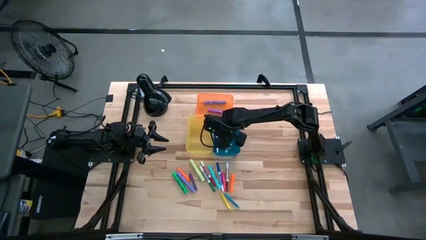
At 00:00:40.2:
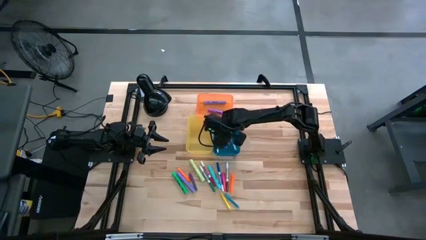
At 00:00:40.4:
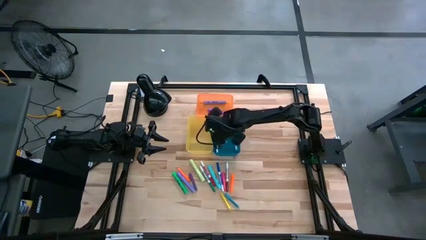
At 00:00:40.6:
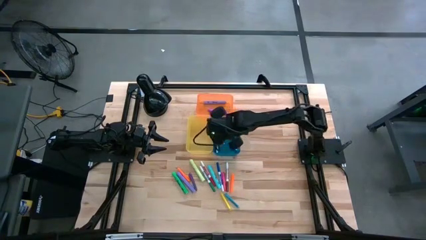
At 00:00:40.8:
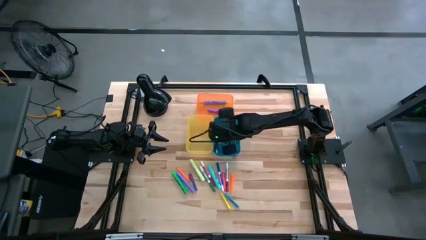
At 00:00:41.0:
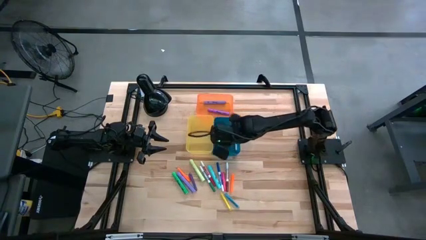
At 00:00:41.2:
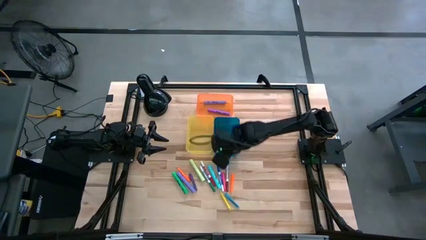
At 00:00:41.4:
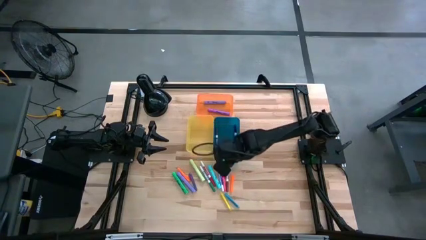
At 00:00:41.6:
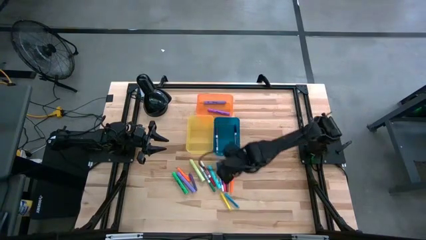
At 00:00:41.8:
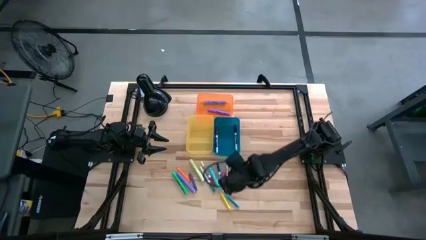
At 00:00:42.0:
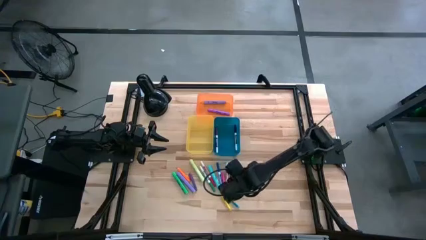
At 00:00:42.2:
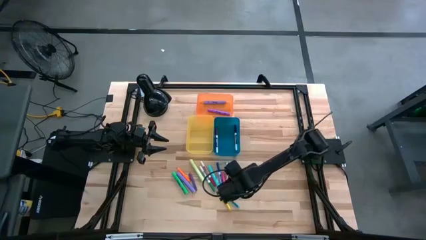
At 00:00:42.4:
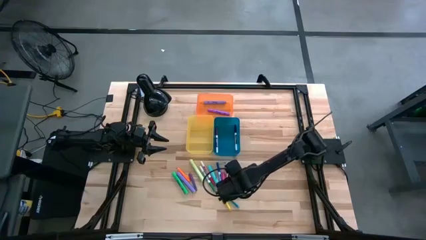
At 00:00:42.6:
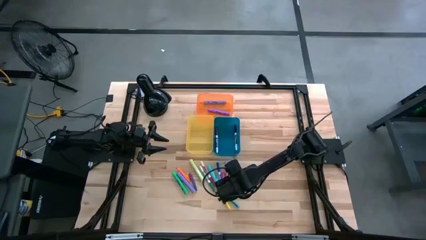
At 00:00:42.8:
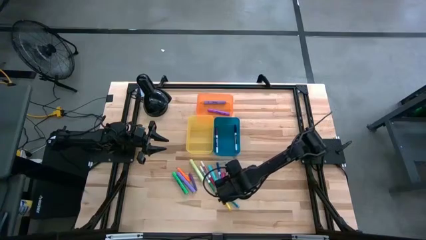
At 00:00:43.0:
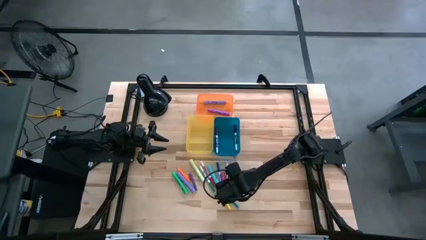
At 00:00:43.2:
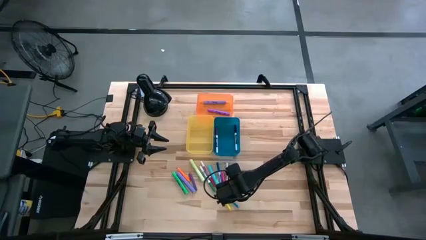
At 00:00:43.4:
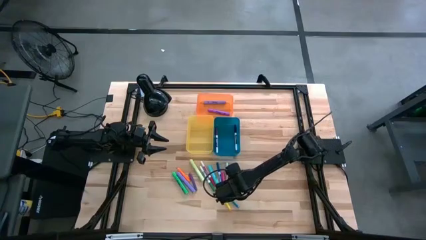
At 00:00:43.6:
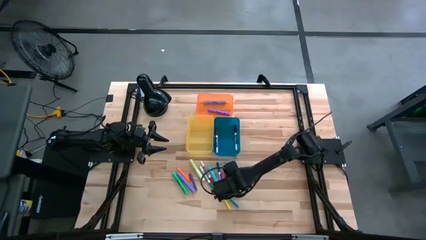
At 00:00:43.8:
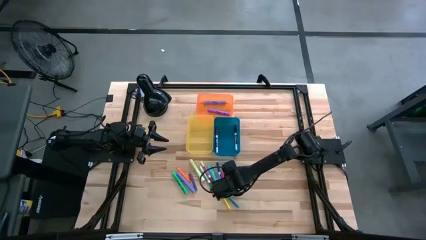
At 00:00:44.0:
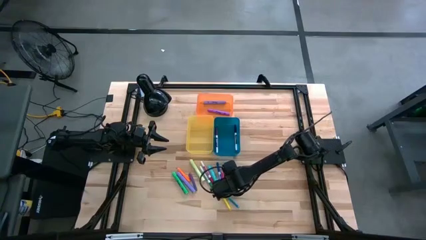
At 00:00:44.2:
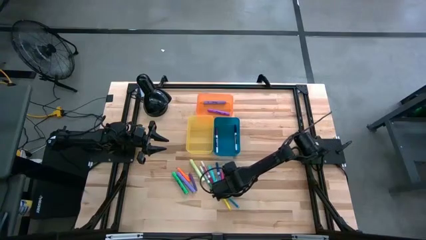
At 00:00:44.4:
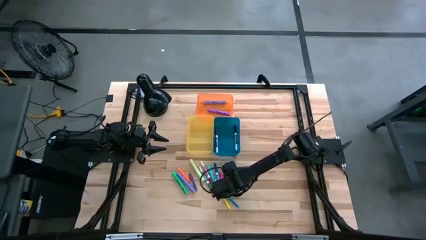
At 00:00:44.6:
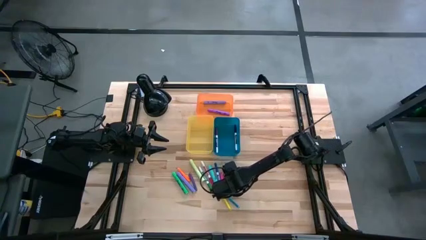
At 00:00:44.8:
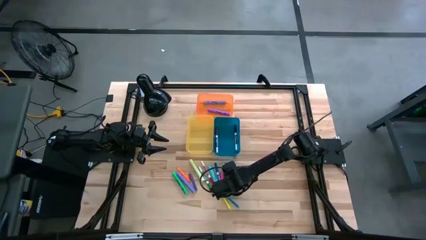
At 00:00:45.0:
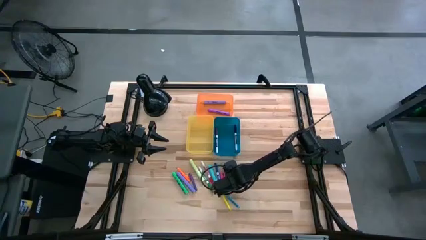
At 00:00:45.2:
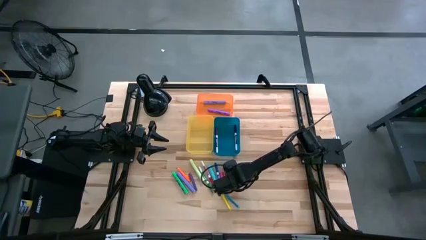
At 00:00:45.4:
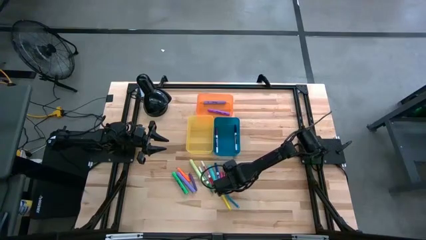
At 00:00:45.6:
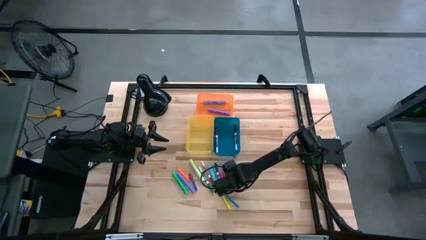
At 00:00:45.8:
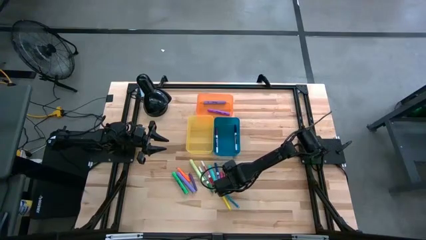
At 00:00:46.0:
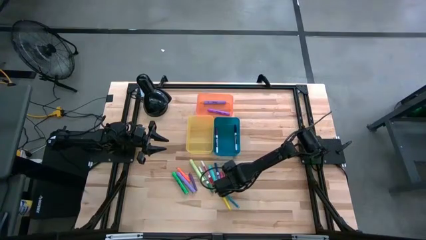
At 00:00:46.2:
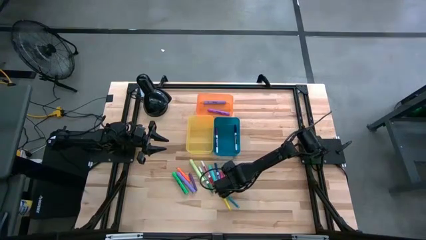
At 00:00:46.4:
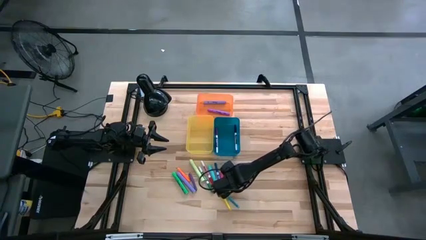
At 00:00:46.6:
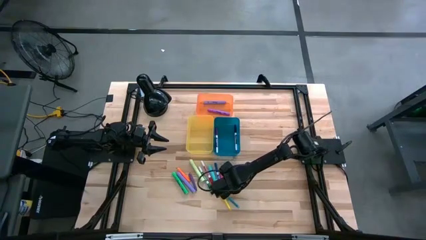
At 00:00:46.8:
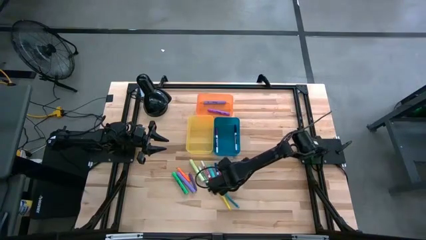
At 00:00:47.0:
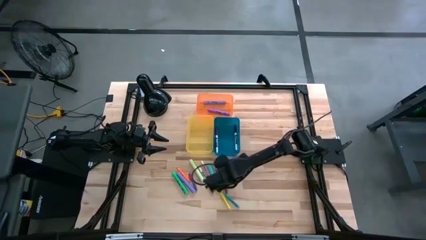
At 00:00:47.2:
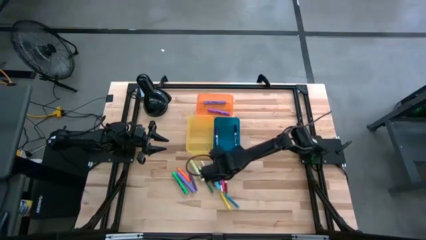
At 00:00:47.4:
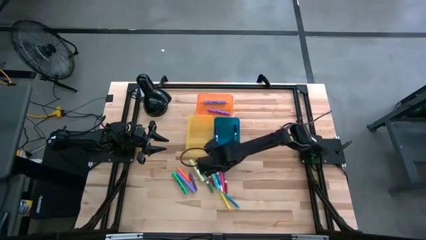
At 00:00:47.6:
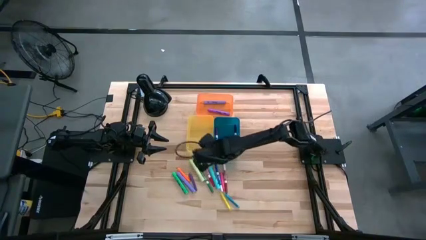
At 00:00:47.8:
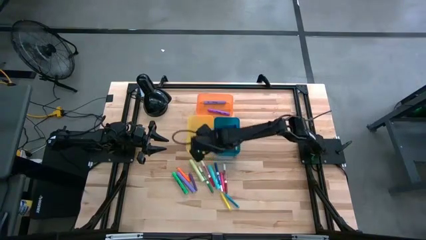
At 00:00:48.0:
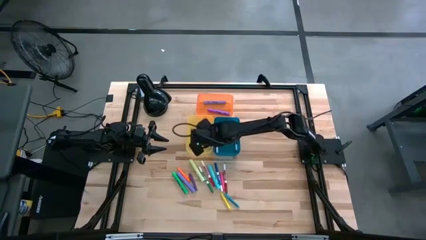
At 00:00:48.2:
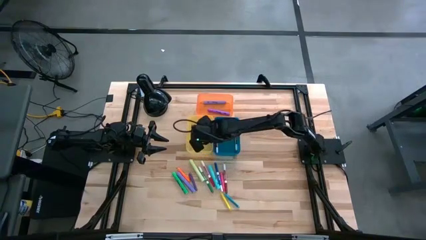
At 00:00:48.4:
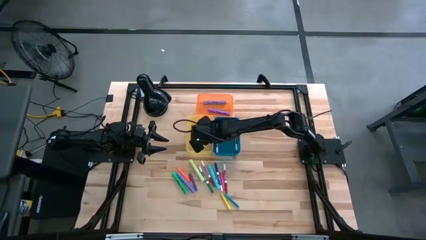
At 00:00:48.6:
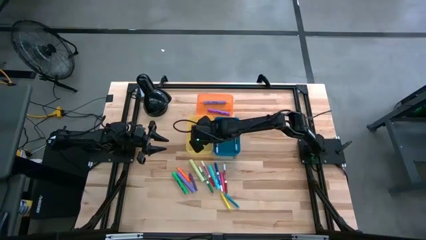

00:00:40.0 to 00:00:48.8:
Task: Pick & Place Markers
Put the right orange pen into the yellow bin

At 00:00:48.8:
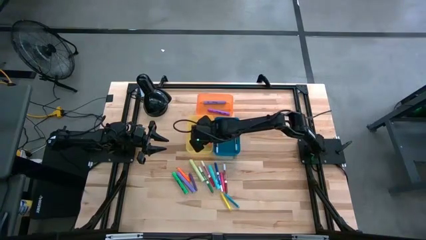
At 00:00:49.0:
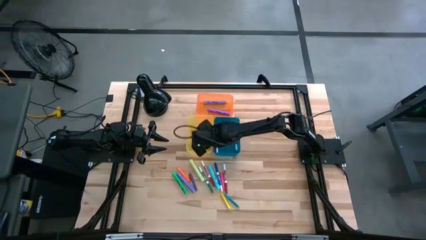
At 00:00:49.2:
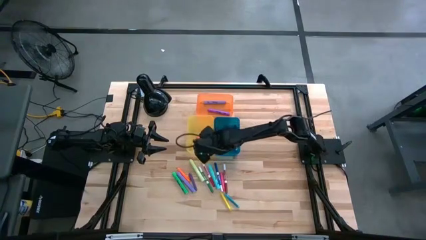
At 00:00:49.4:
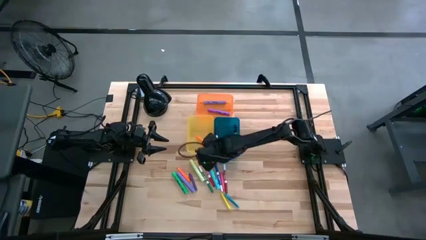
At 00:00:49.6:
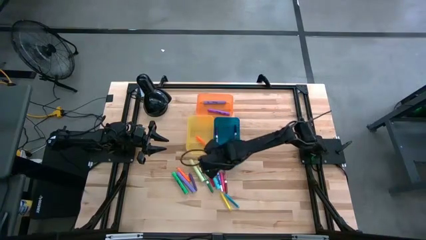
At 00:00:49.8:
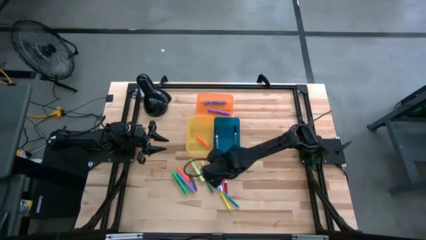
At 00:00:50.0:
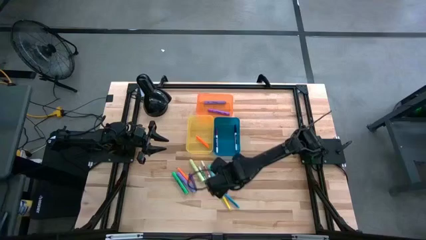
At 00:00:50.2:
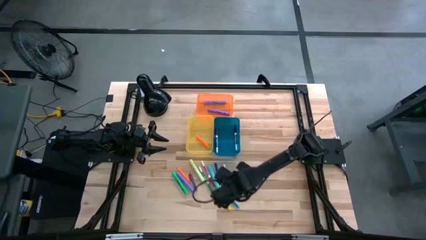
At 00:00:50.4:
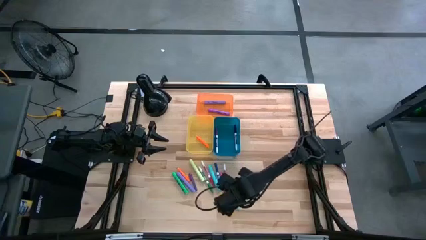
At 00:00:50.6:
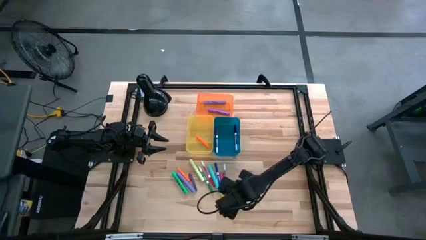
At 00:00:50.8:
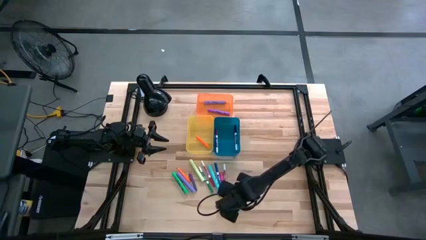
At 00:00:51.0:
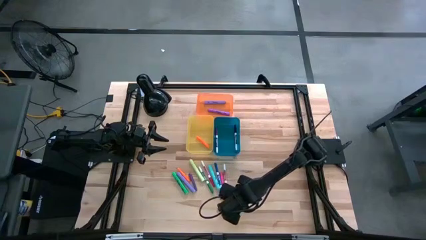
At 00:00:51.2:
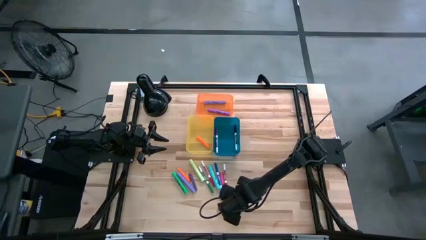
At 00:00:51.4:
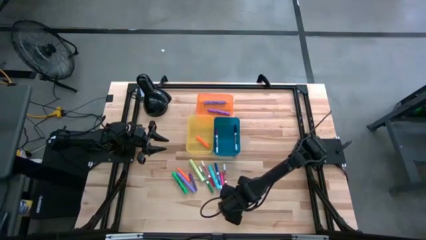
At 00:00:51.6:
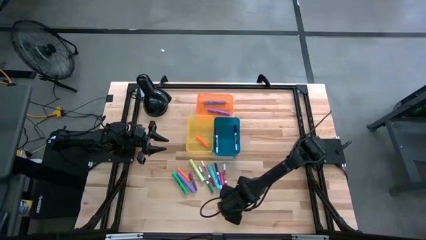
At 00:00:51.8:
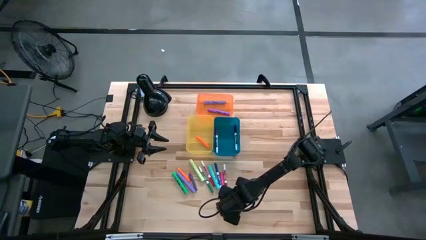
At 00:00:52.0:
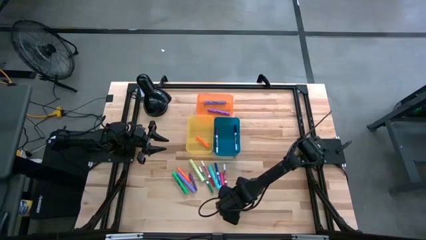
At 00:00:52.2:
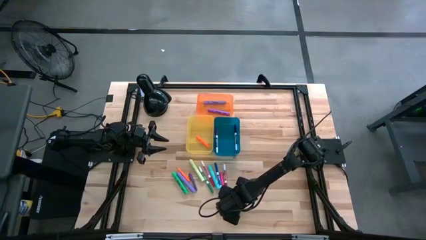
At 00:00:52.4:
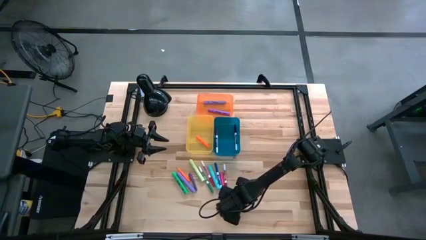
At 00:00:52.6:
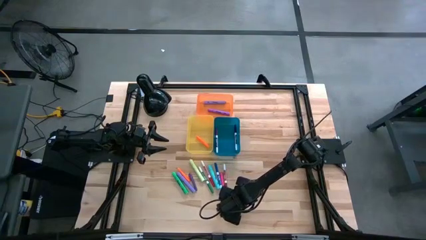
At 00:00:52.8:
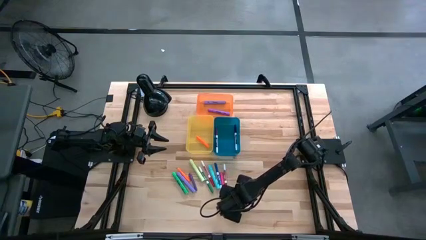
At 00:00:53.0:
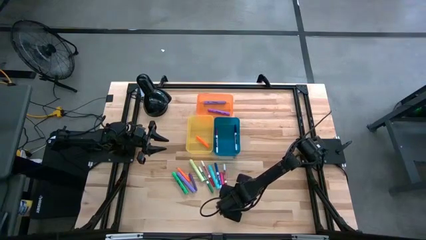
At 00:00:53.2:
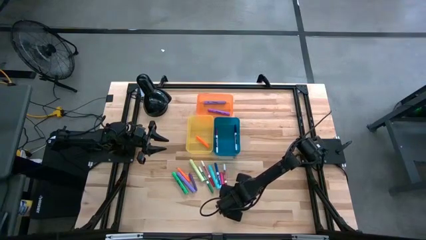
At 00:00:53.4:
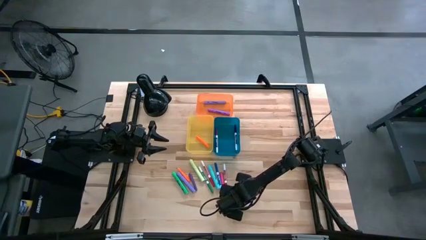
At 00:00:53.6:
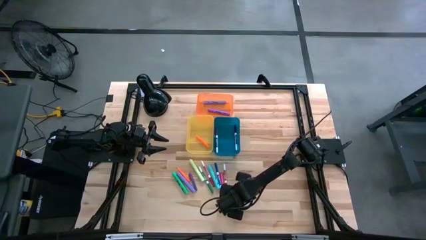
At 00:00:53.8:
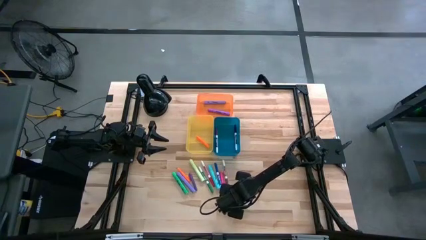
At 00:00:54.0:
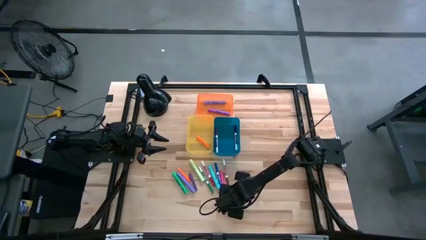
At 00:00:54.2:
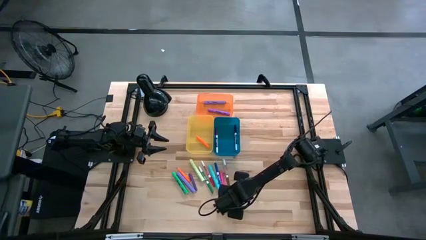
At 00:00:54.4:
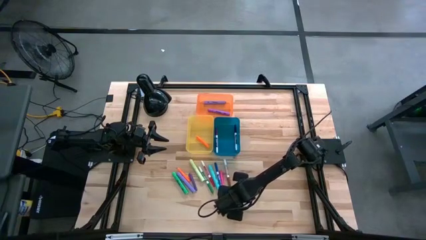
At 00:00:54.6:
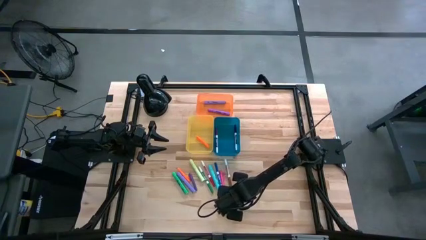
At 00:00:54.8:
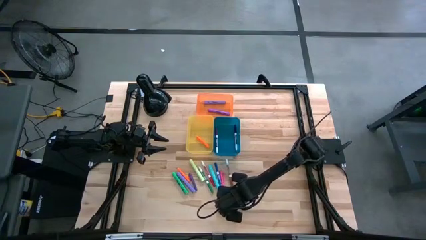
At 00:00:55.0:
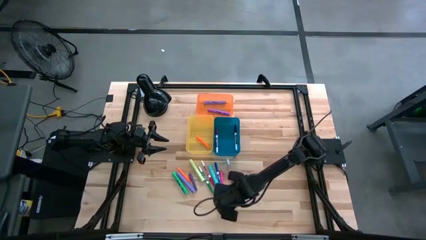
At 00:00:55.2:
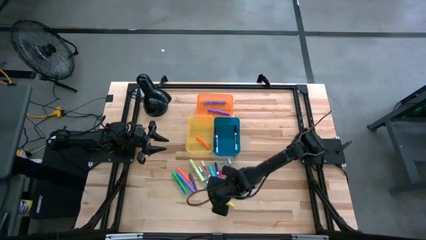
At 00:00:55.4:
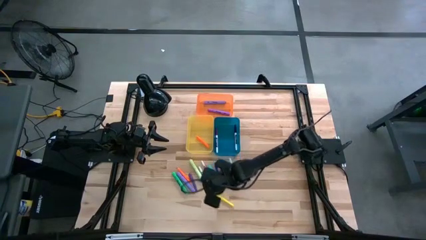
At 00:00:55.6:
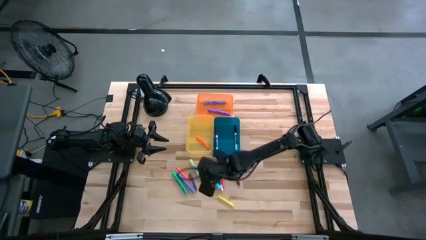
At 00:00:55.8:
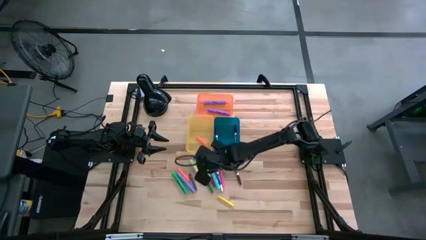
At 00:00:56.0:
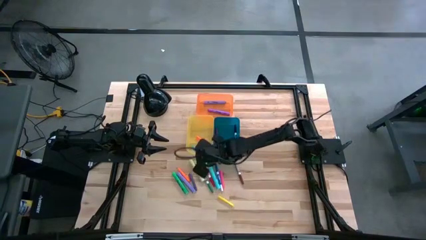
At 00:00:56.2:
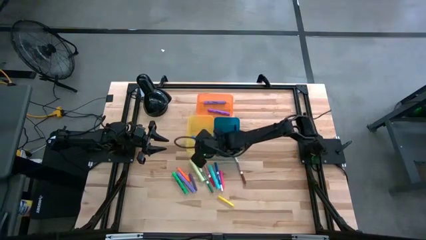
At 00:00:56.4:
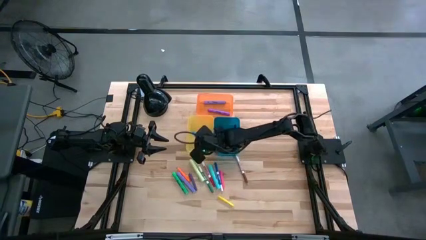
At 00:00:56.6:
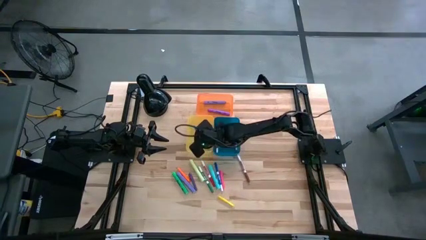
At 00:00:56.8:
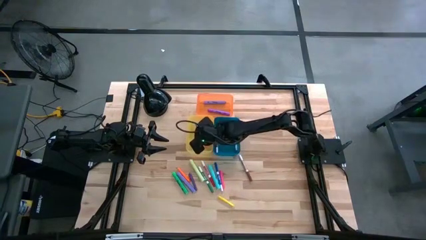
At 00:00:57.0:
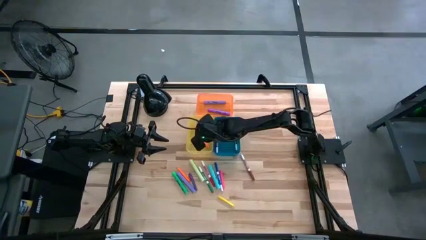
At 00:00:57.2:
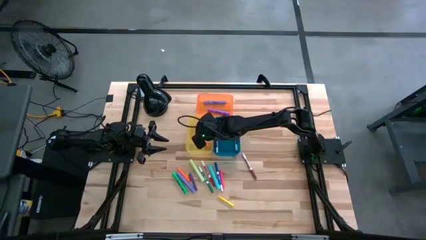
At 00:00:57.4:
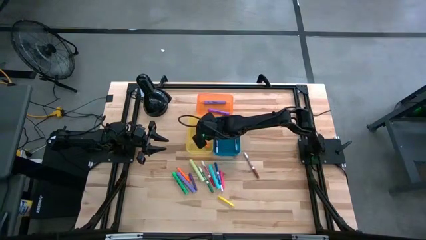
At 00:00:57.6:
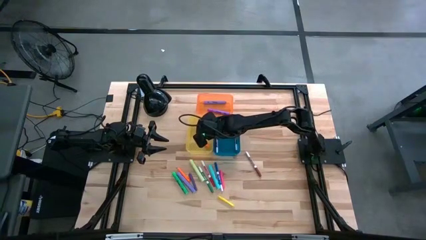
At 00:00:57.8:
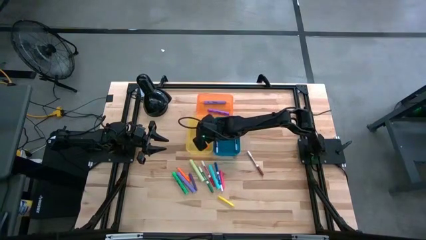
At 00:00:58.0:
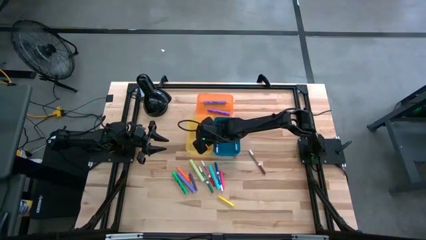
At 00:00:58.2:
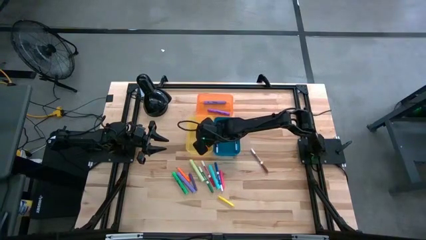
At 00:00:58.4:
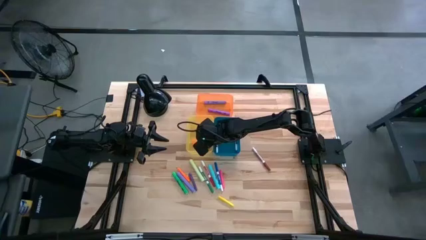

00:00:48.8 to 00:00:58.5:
Put the blue pen into the yellow bin
